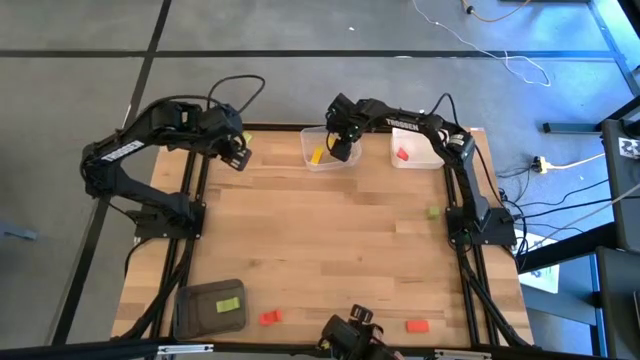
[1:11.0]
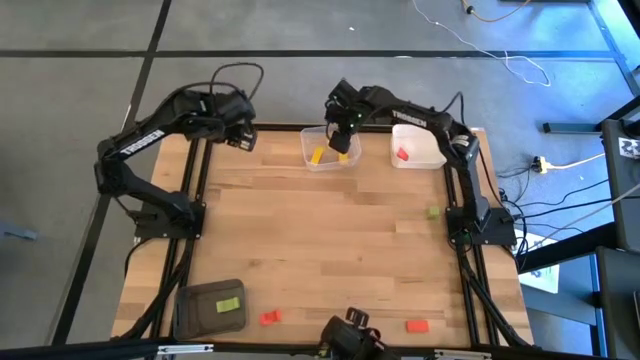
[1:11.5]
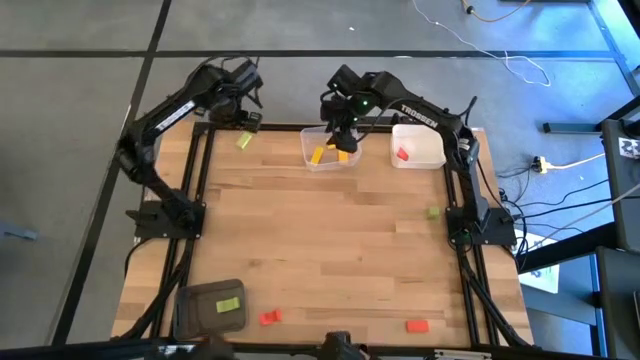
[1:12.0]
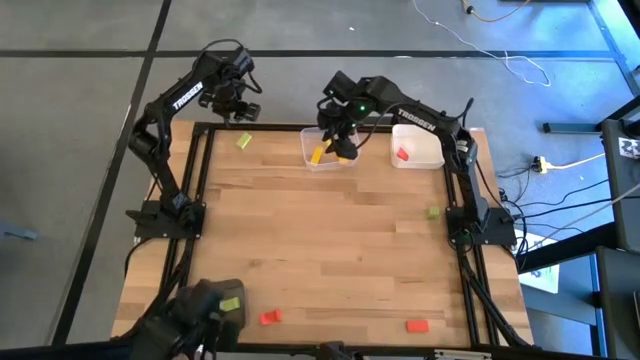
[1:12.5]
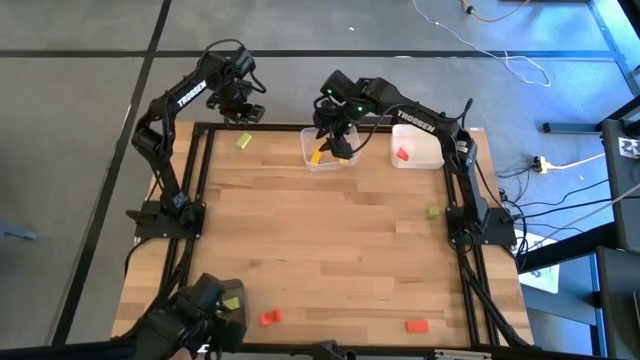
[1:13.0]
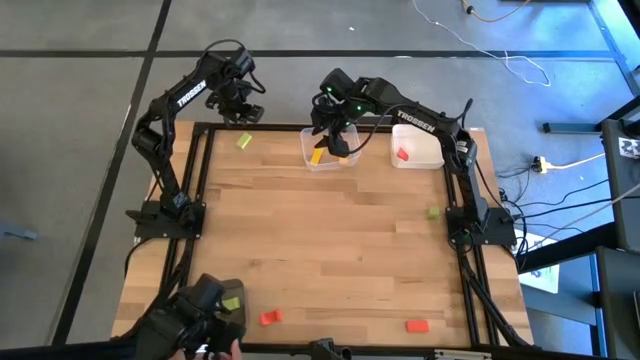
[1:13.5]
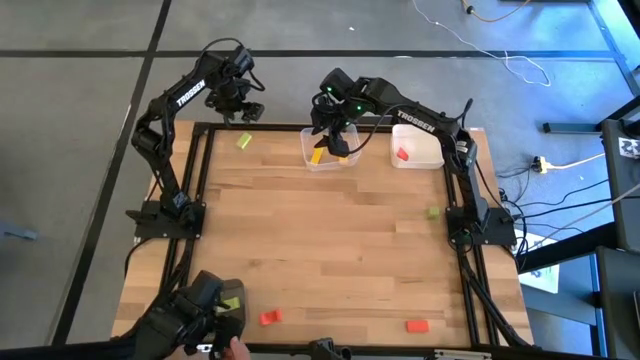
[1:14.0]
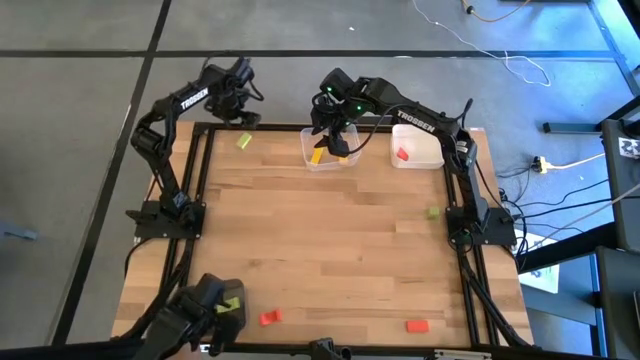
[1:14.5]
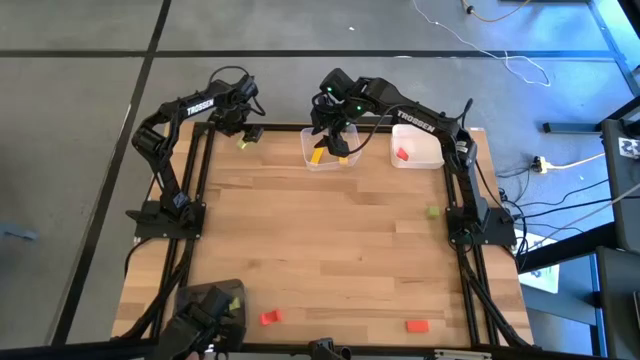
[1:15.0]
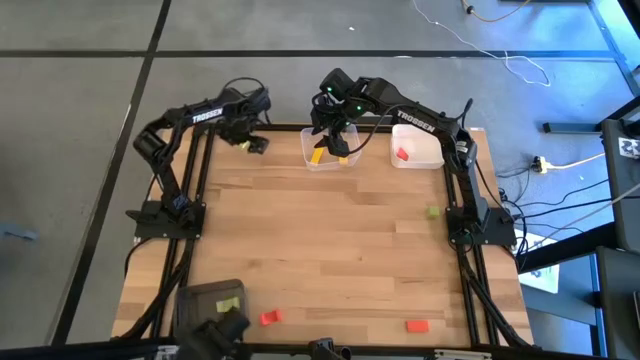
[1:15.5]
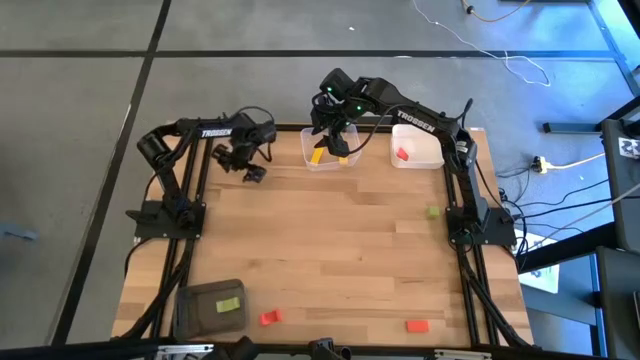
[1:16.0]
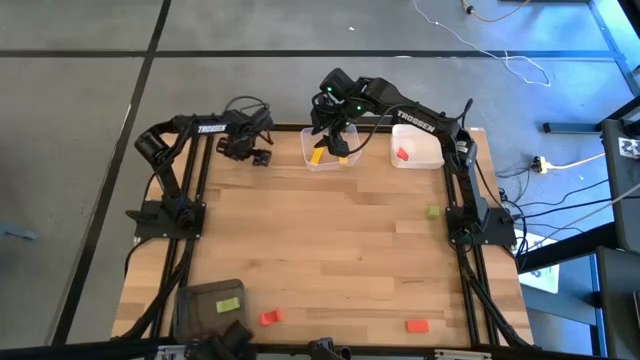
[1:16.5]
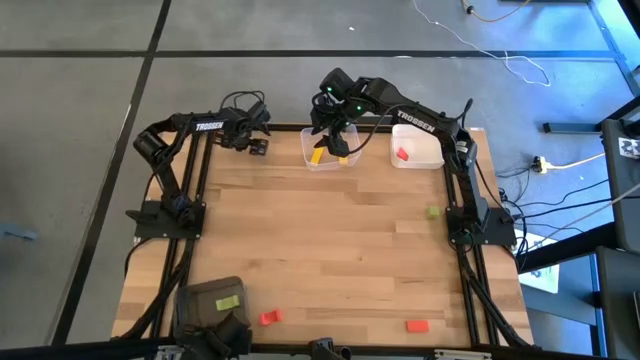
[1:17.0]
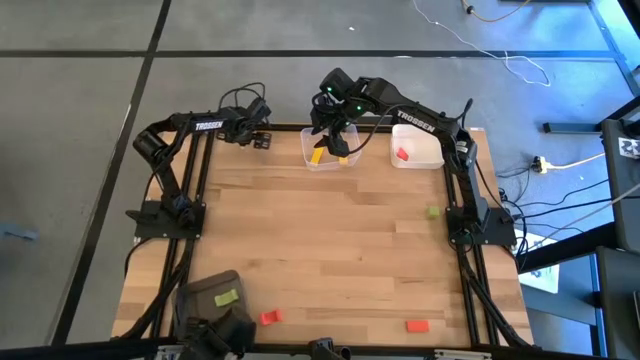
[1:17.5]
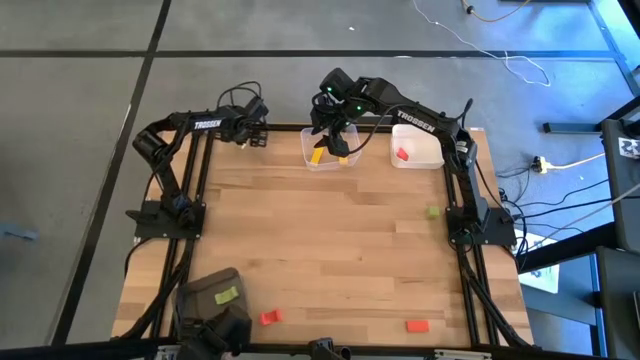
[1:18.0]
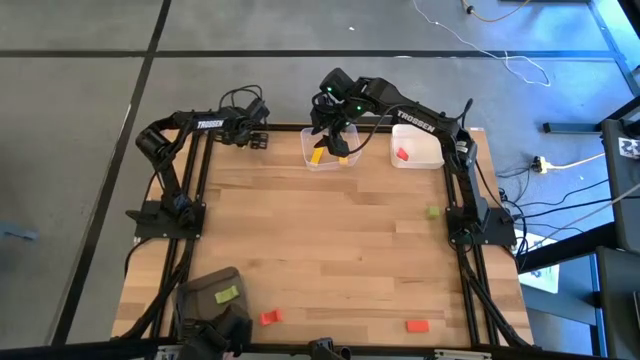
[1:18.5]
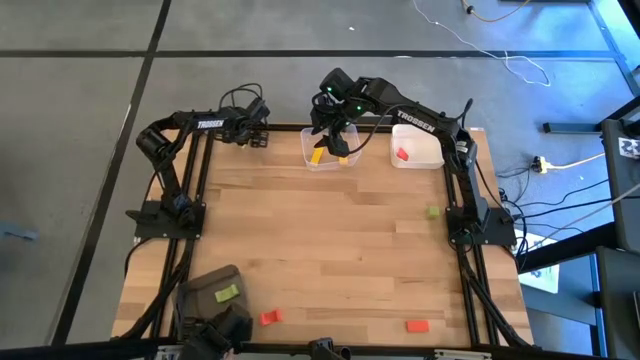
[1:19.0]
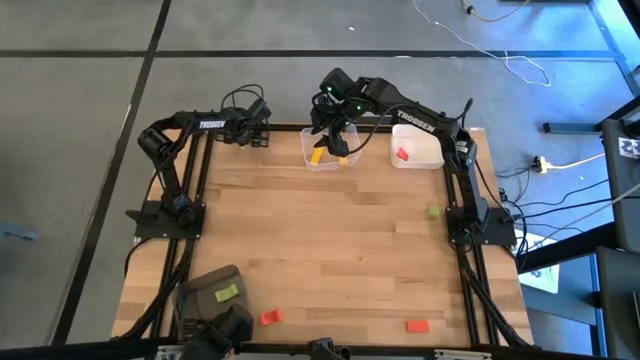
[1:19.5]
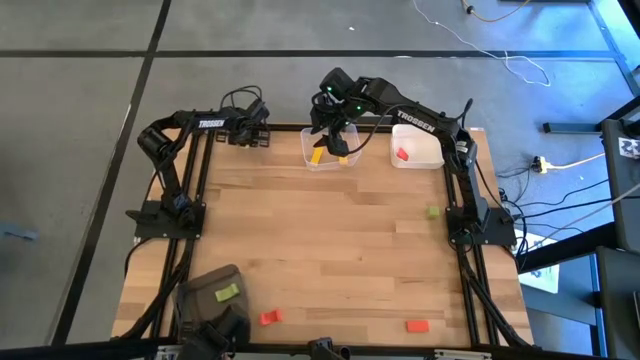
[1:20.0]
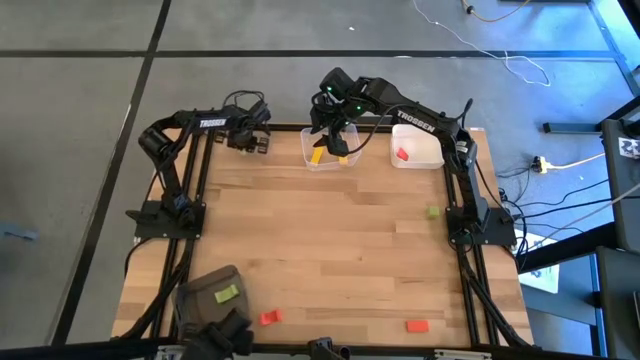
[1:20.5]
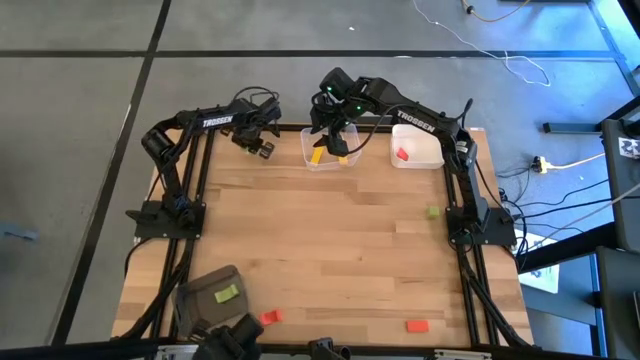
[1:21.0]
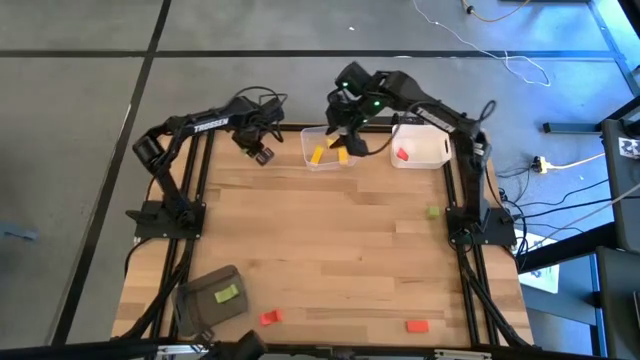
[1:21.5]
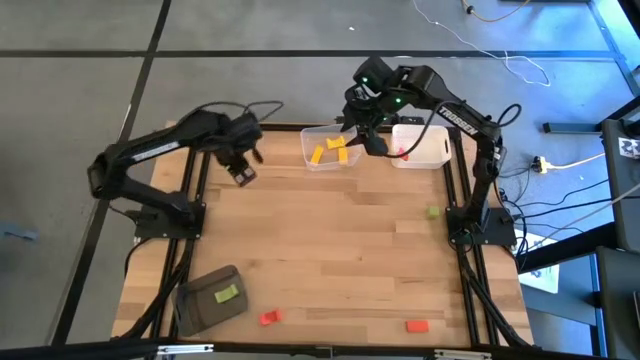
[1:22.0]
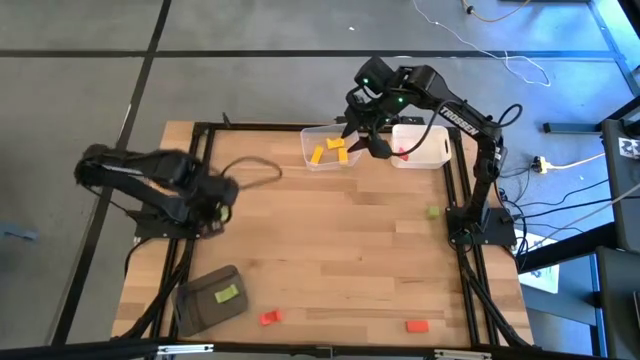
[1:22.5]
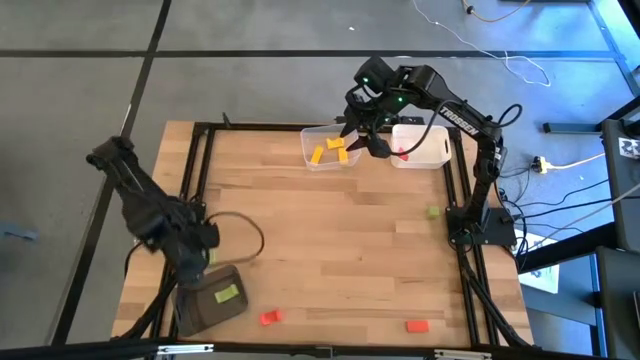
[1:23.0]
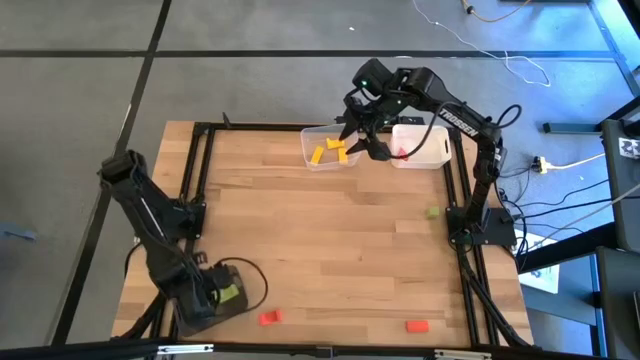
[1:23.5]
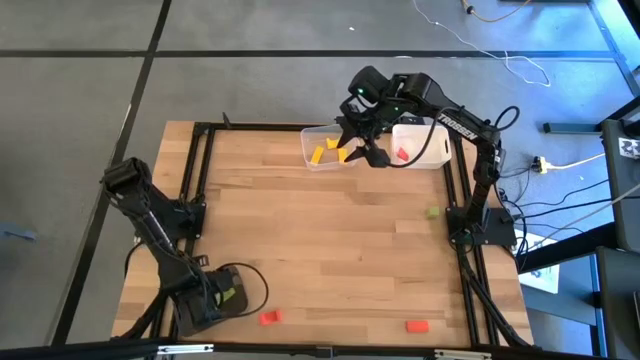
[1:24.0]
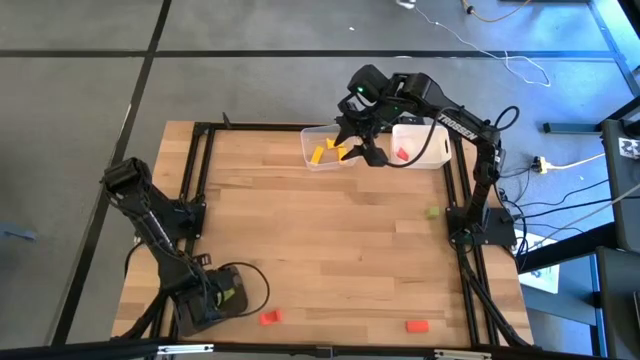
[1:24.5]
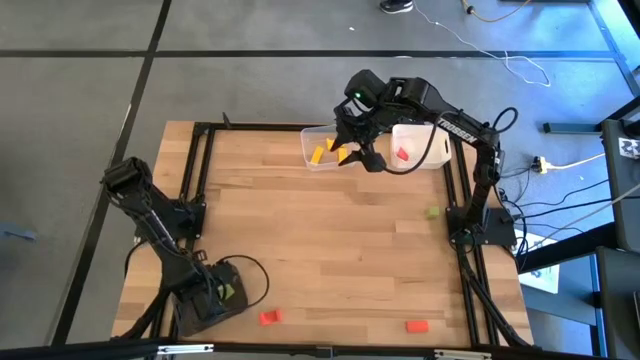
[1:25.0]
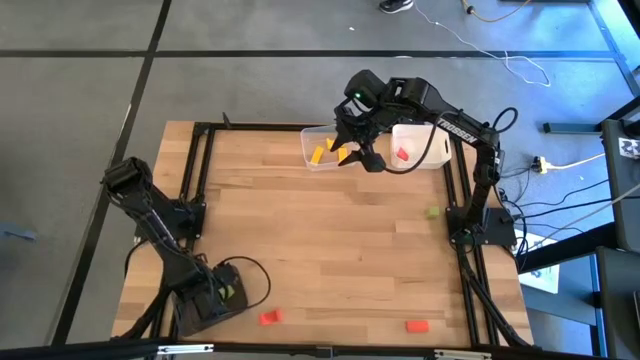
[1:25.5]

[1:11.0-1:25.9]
Task: Sort & place blocks by color
Put the left green block into the black bin

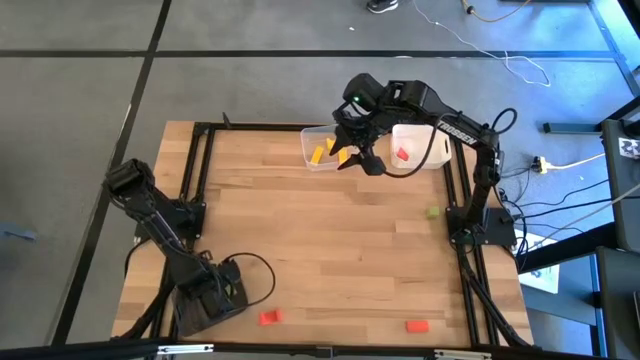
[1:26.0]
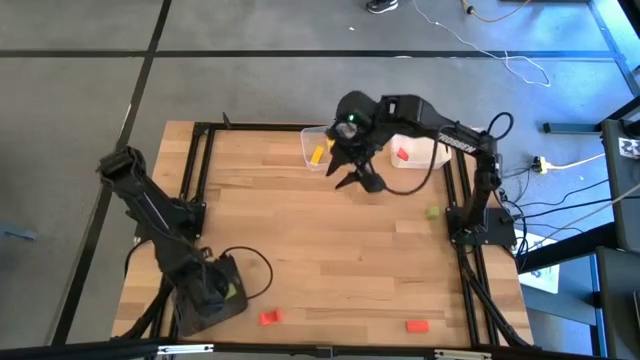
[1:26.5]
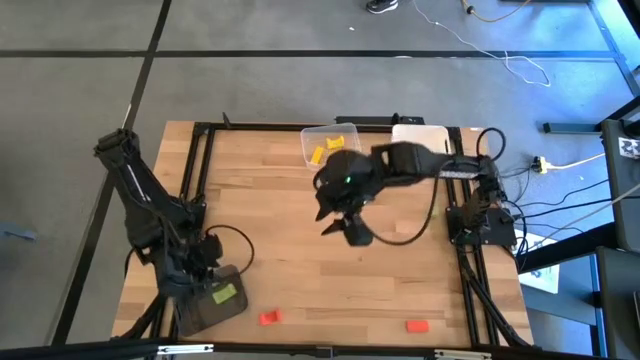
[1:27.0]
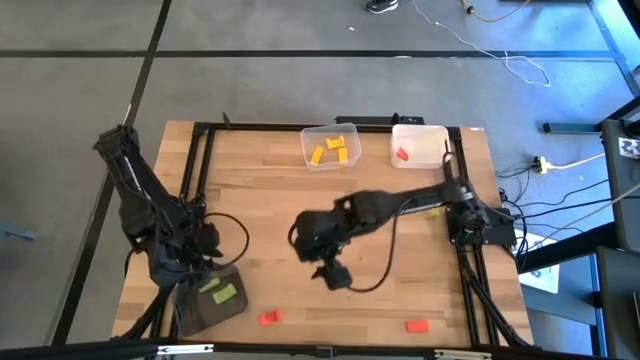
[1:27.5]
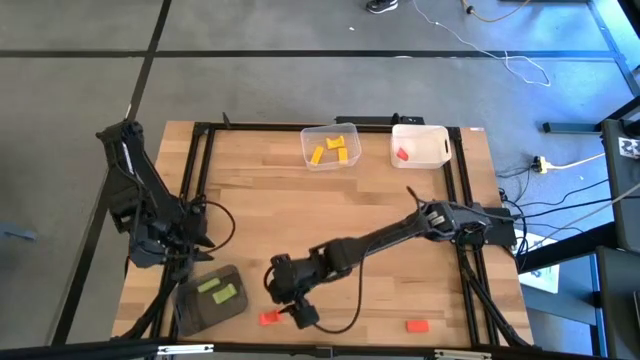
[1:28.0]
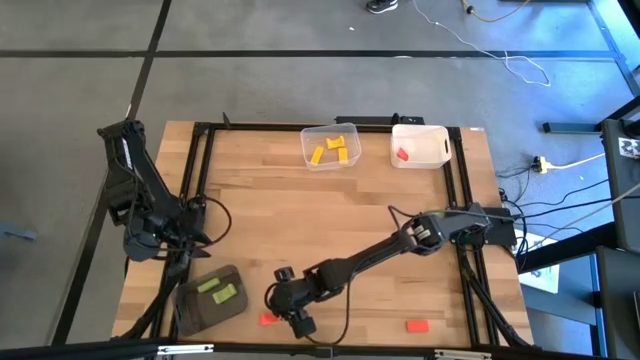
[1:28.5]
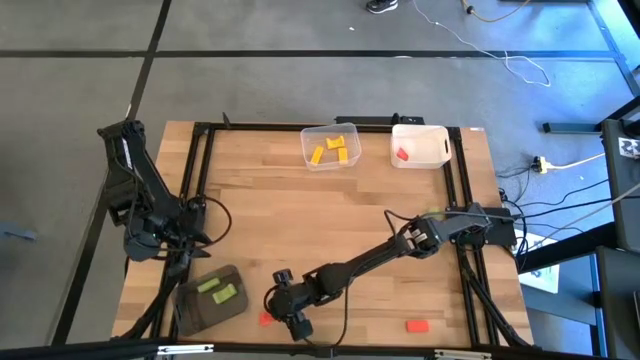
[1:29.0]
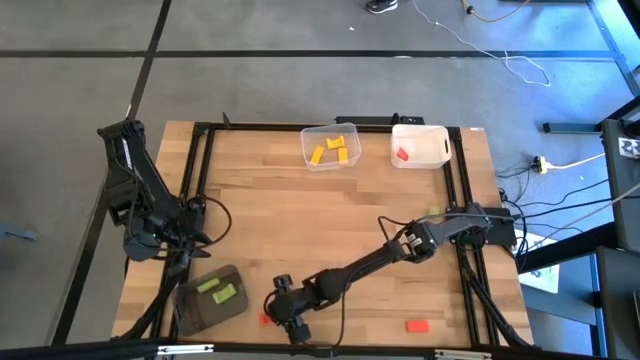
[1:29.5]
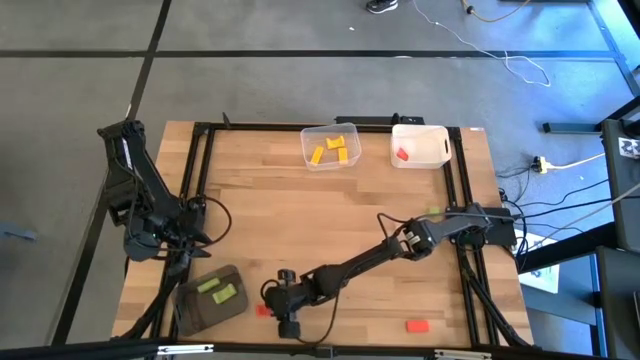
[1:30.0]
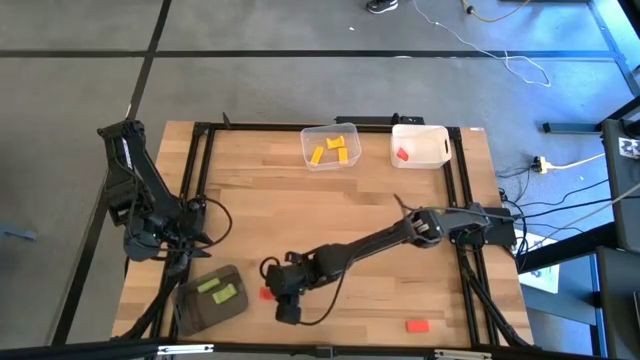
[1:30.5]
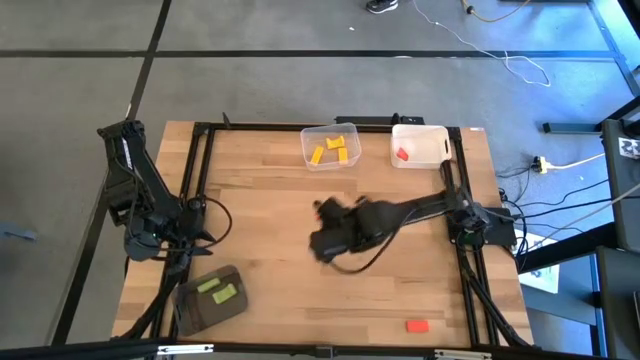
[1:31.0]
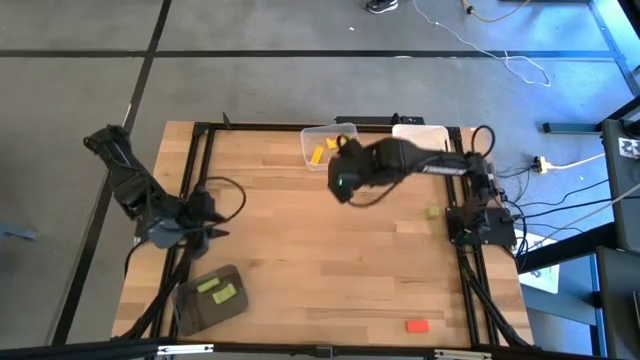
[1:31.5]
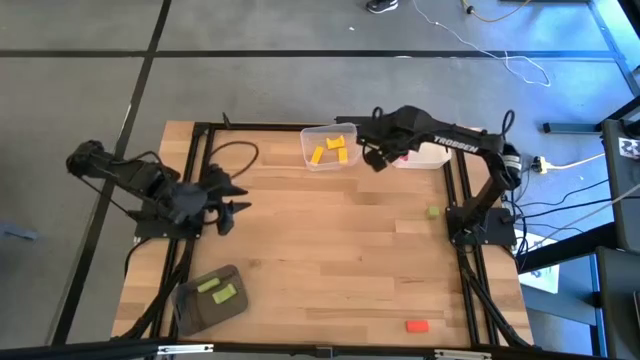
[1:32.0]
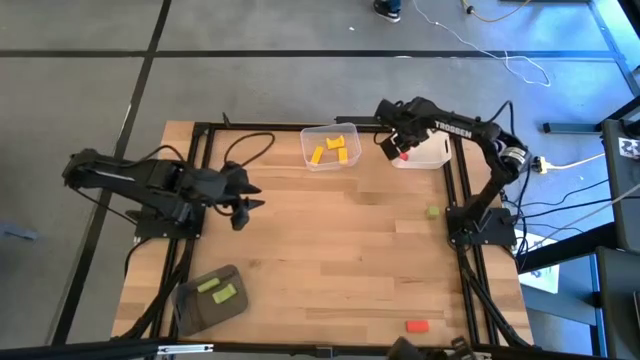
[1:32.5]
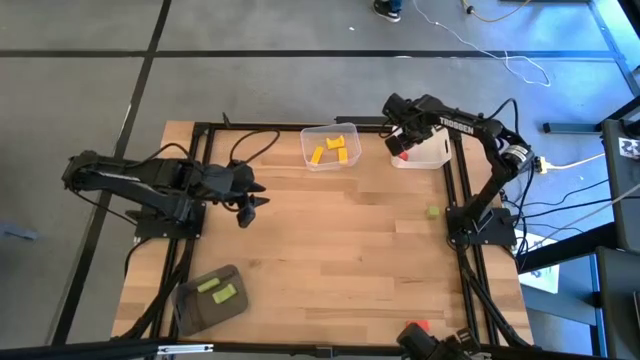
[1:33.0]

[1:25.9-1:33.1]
Put the left orange block into the white bin
